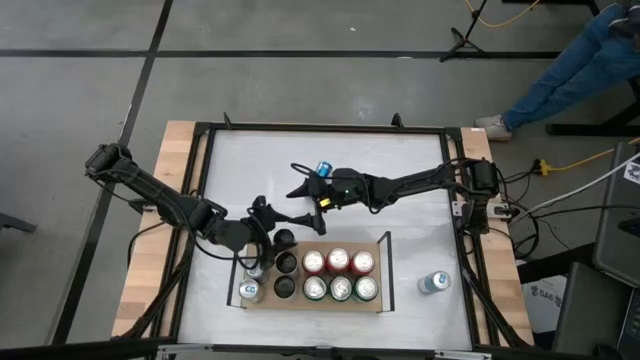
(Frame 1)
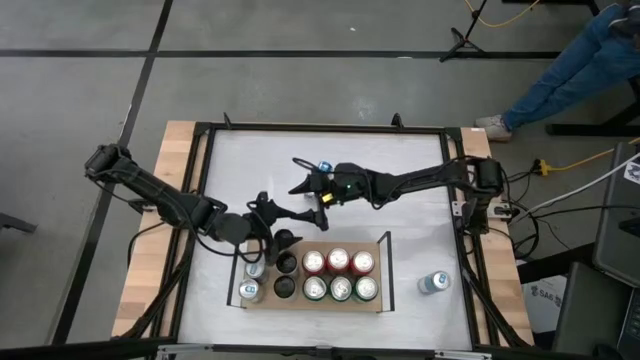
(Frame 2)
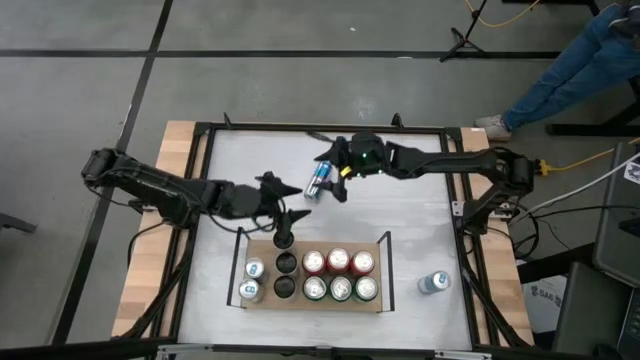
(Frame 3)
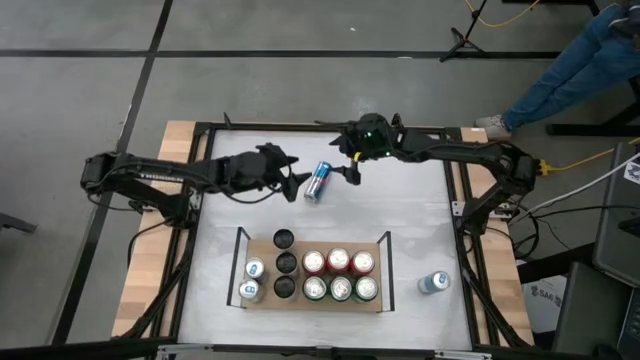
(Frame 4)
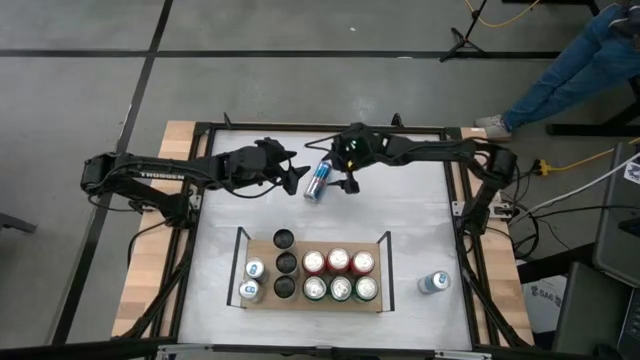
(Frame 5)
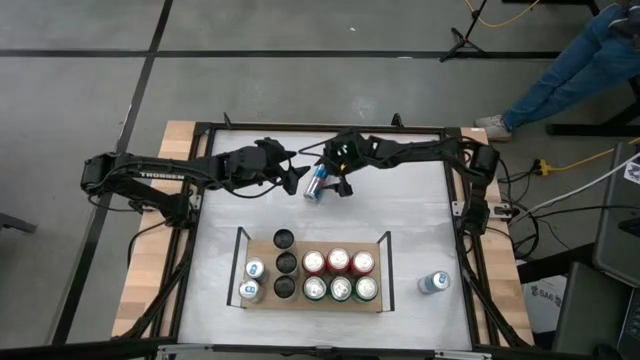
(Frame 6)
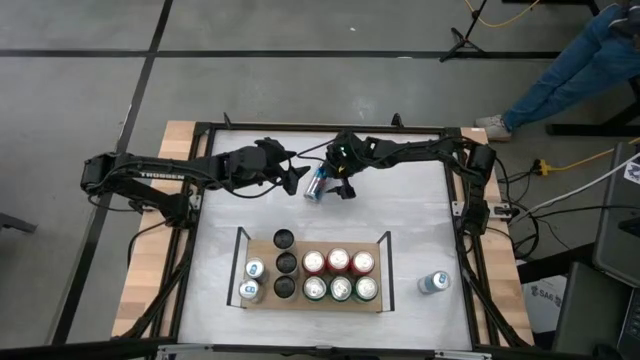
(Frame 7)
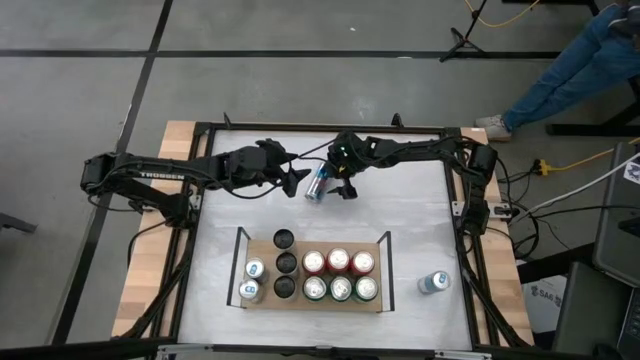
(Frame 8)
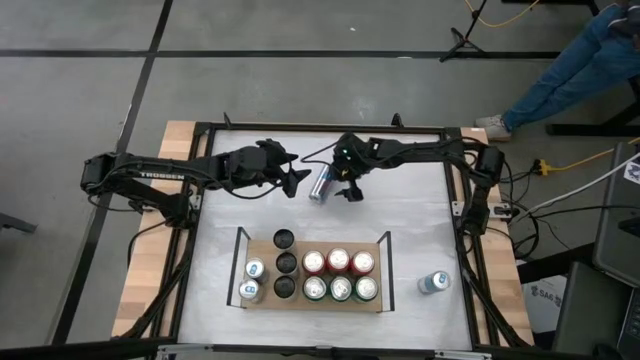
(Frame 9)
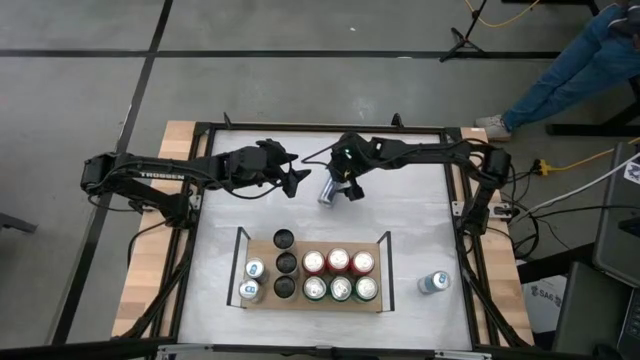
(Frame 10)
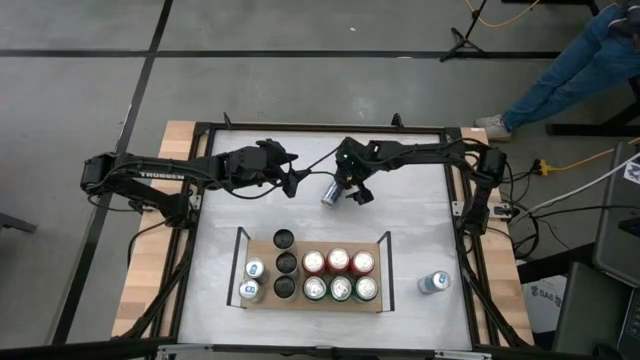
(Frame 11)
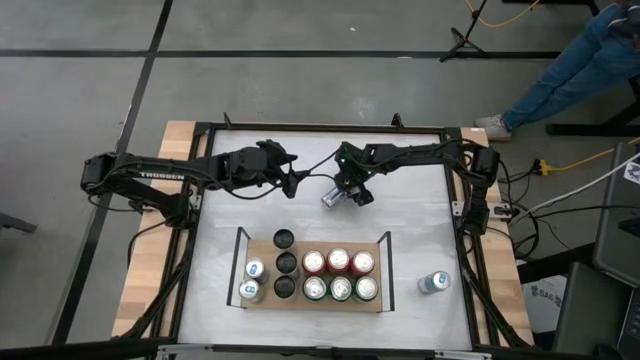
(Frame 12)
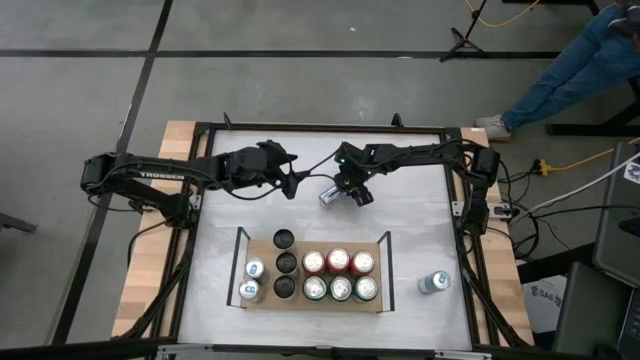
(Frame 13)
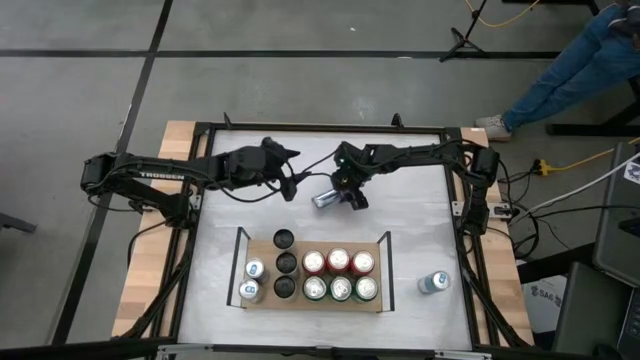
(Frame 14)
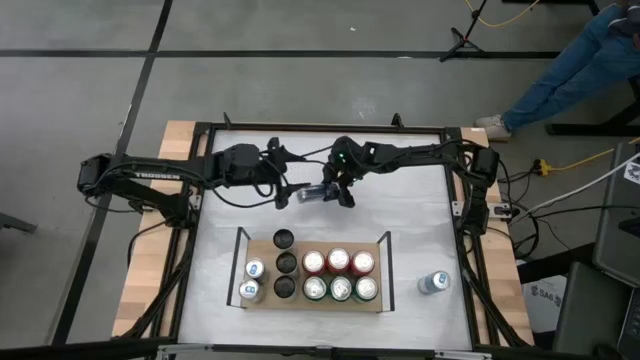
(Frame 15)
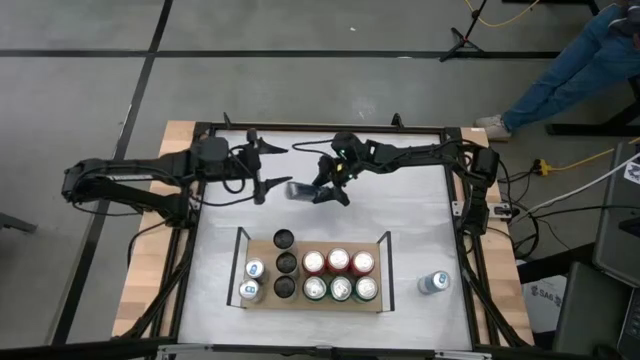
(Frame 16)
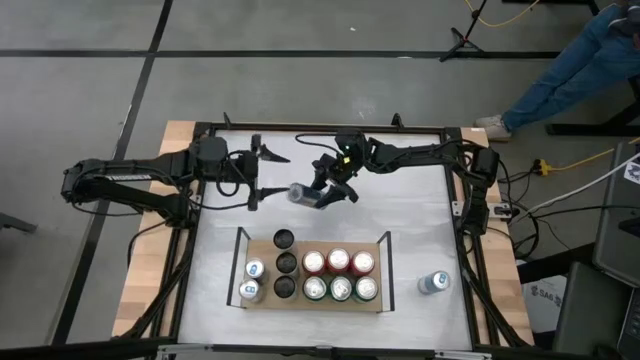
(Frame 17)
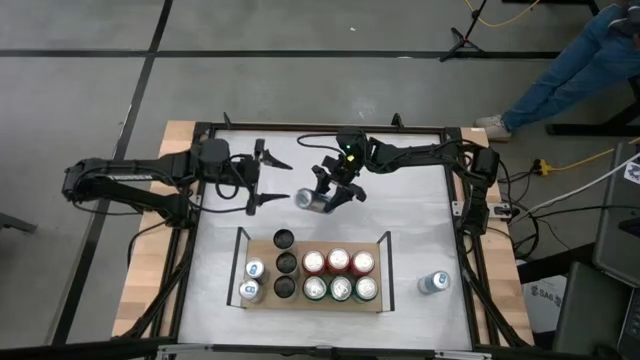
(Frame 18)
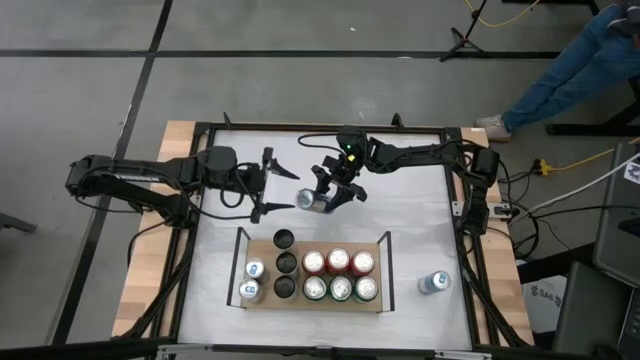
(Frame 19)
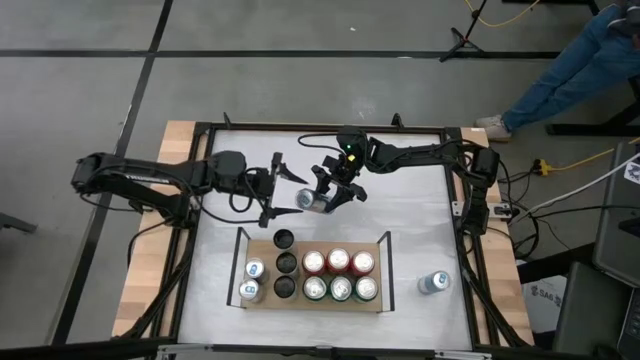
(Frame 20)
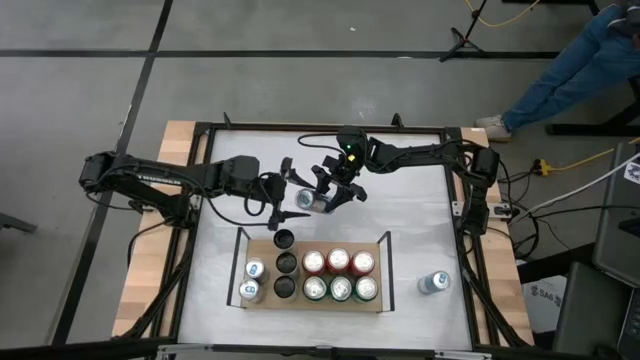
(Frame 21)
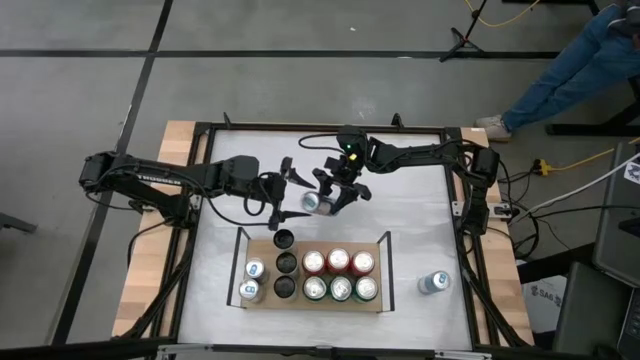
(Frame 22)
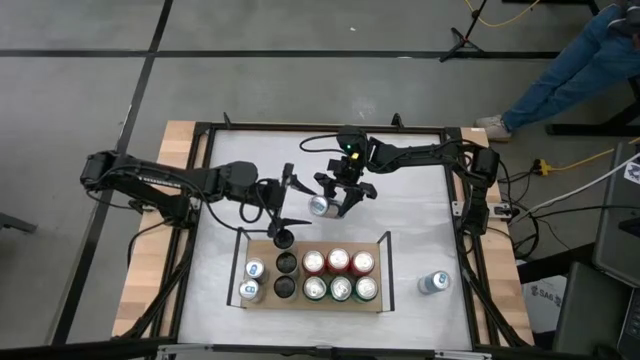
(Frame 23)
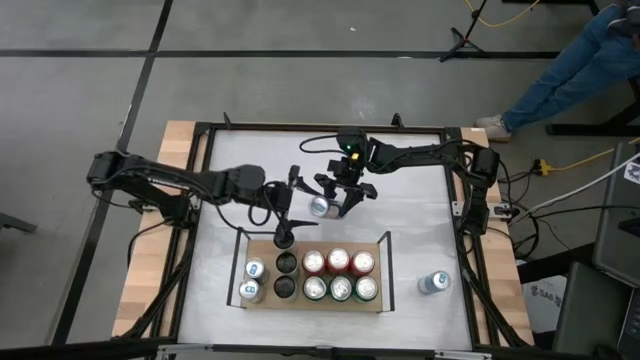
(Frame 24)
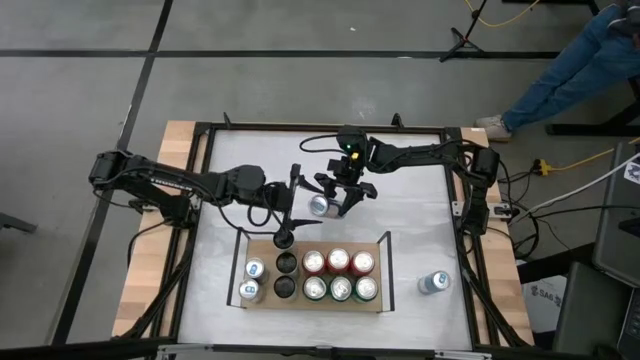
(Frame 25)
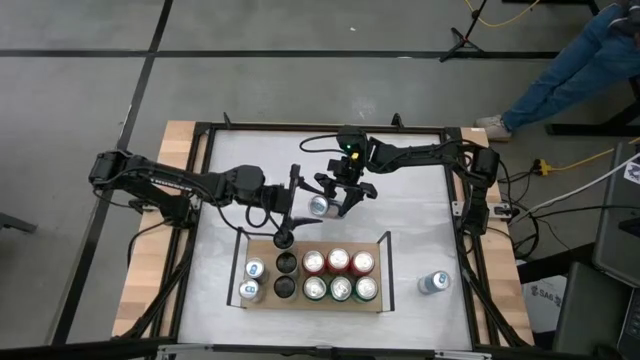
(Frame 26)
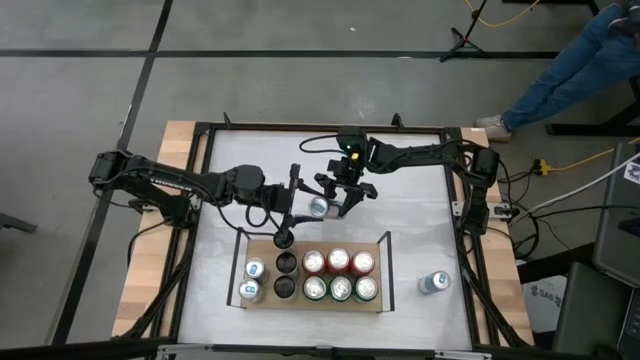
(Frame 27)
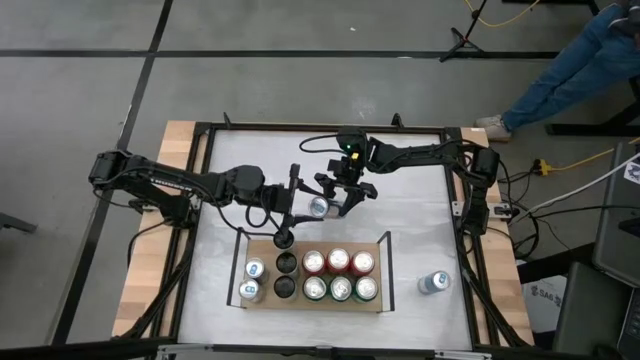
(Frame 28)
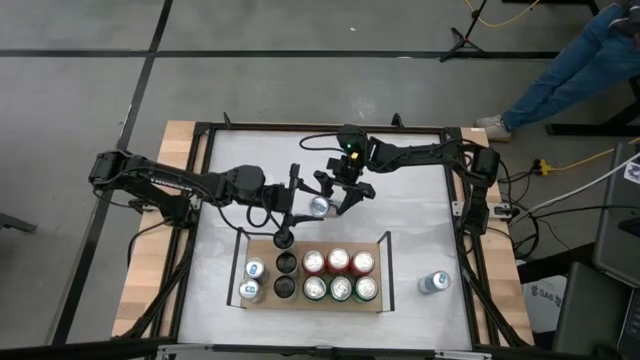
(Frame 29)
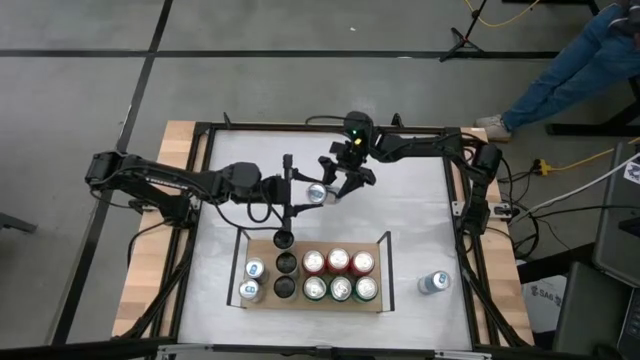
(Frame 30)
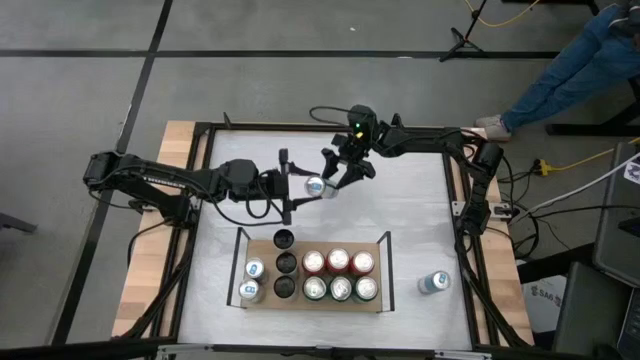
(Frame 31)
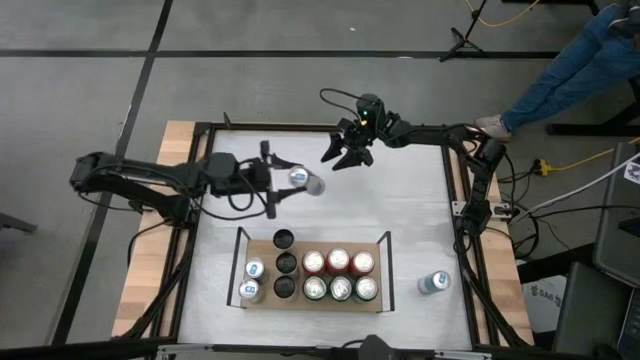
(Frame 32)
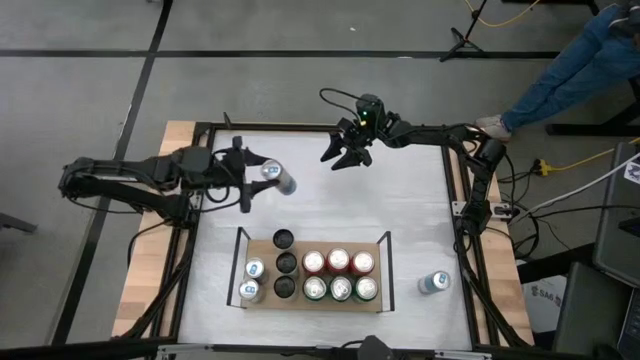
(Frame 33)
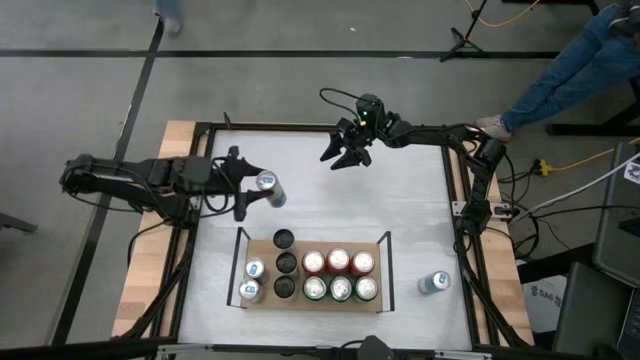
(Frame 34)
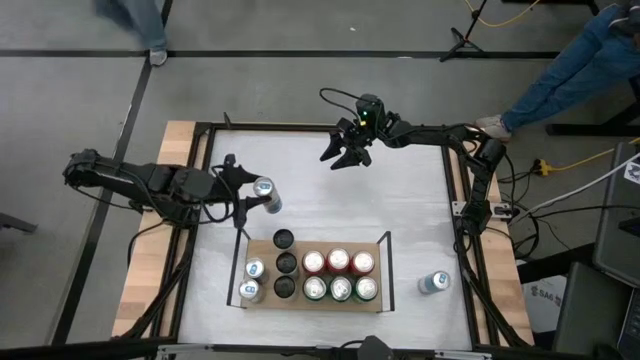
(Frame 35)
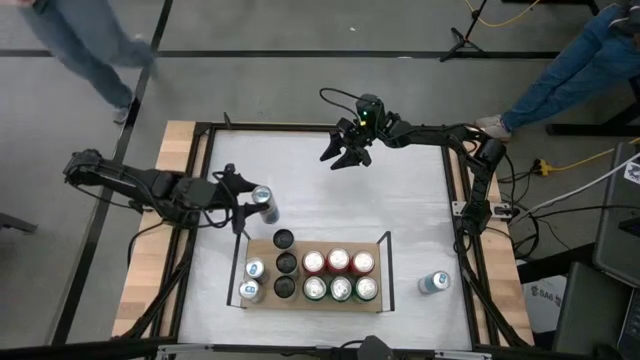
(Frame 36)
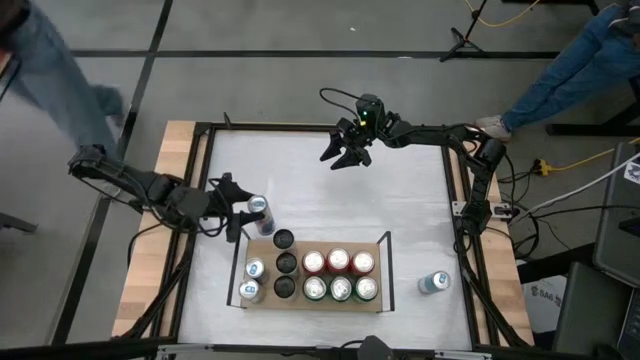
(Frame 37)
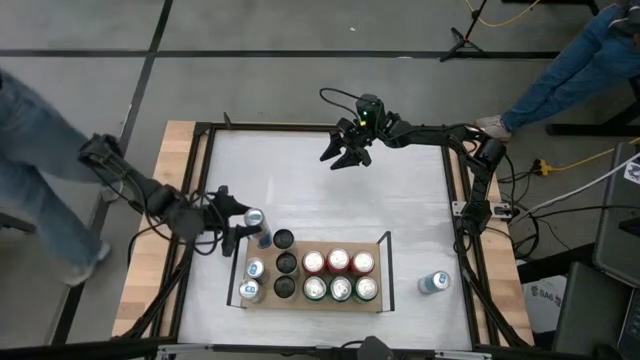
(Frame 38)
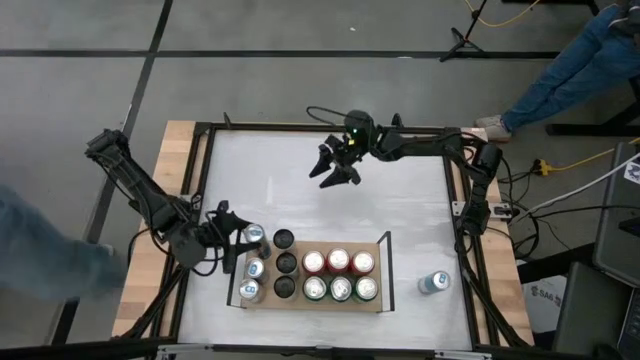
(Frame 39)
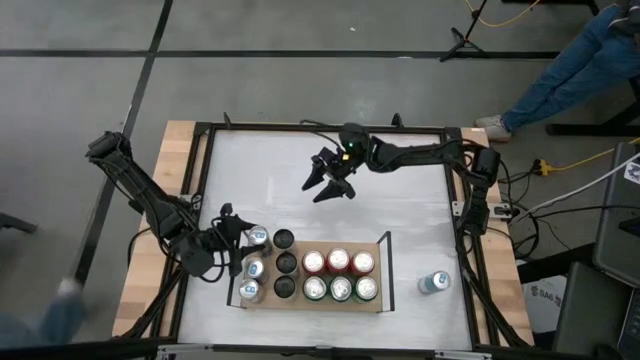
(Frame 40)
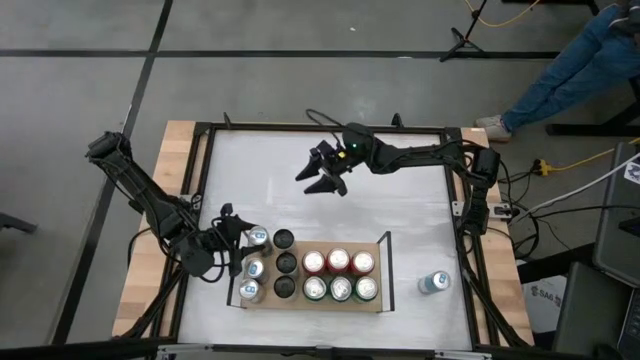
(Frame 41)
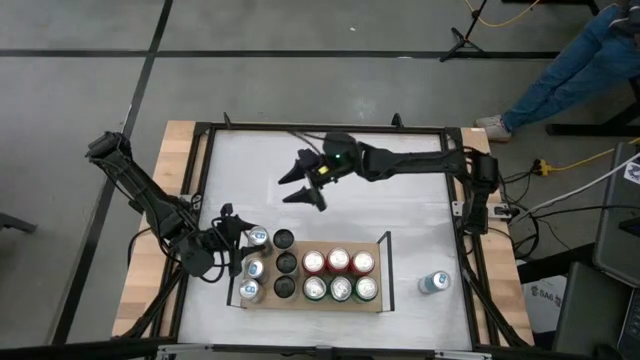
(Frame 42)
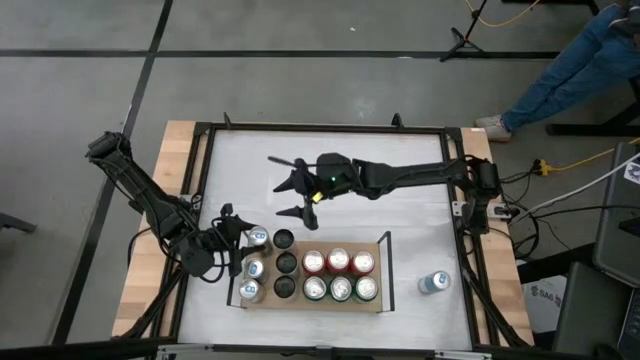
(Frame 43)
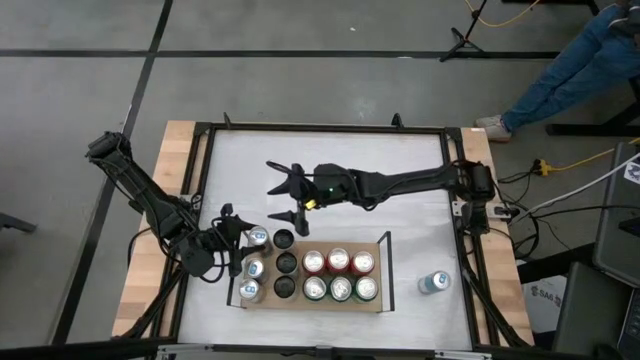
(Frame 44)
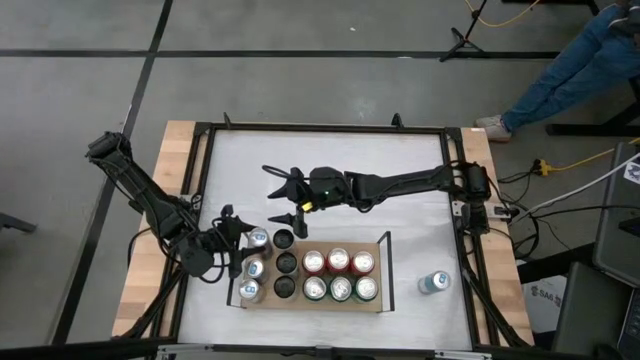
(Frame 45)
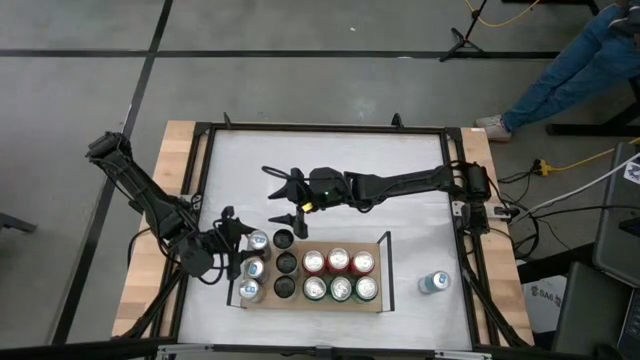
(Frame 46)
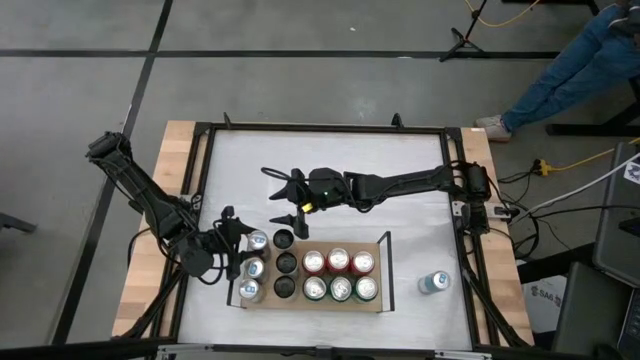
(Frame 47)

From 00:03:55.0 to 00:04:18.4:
Task: Place canned beverage on shelf
Put the top blue soda can on the shelf aligned with the other blue soda can
